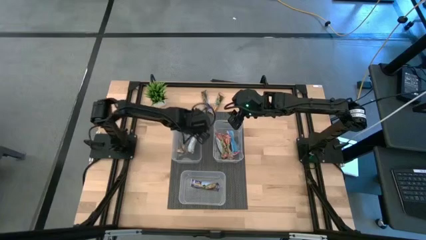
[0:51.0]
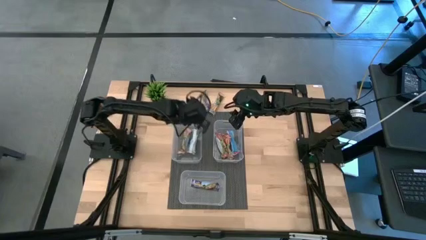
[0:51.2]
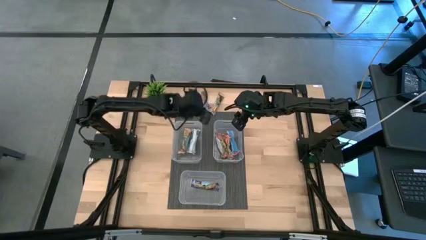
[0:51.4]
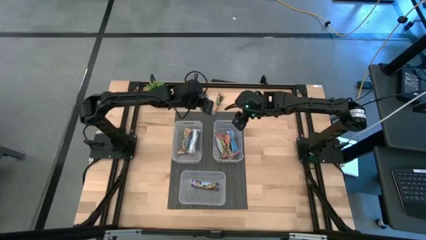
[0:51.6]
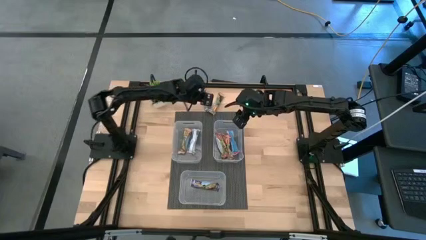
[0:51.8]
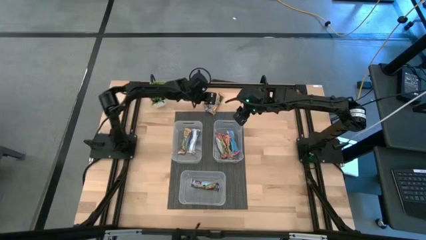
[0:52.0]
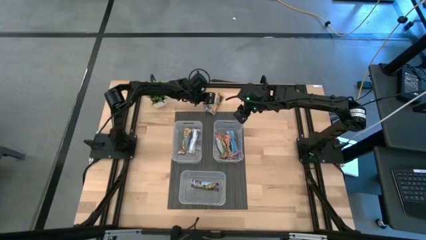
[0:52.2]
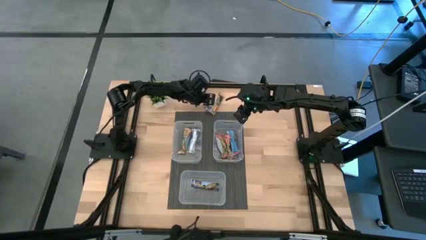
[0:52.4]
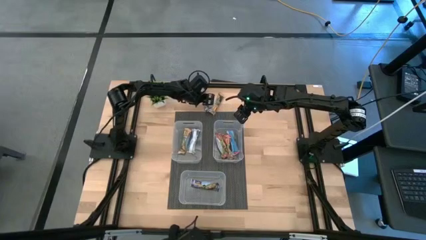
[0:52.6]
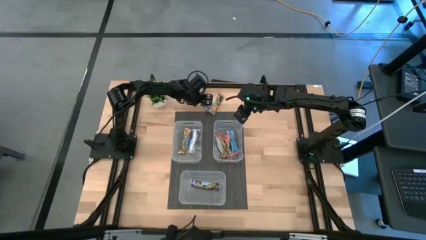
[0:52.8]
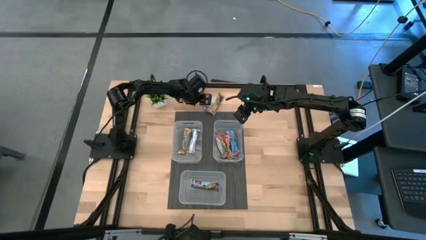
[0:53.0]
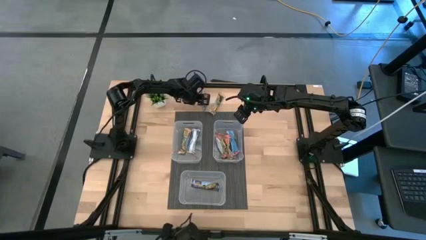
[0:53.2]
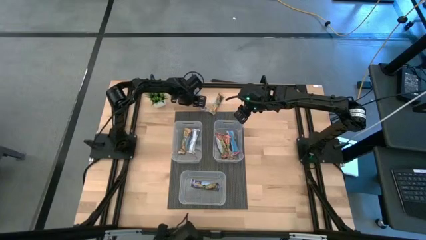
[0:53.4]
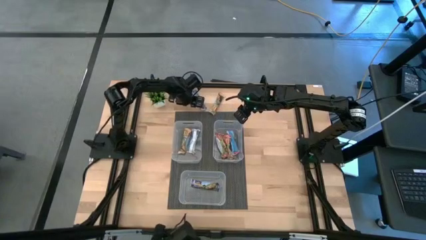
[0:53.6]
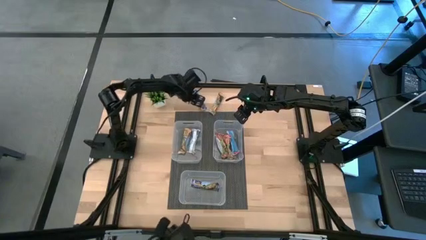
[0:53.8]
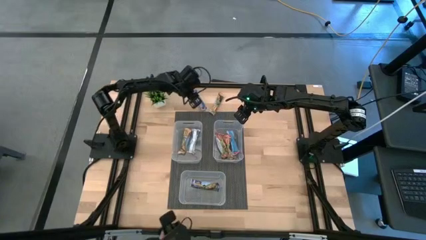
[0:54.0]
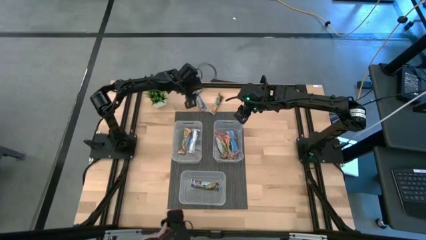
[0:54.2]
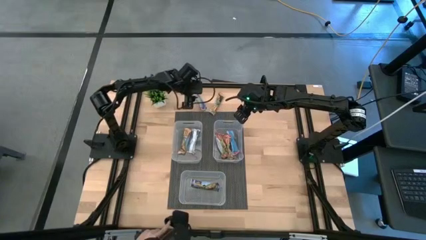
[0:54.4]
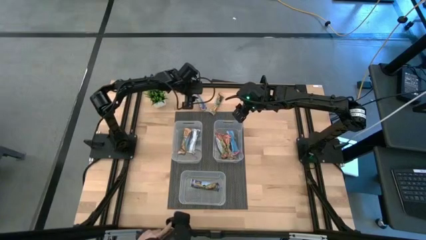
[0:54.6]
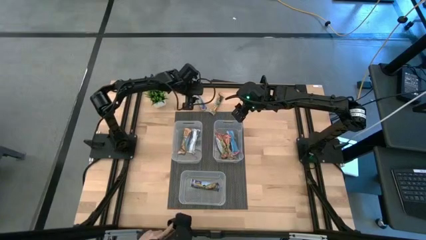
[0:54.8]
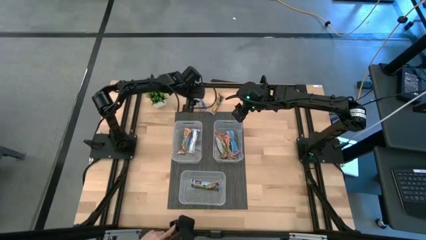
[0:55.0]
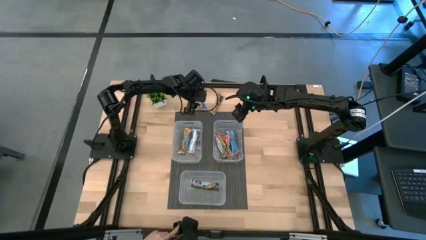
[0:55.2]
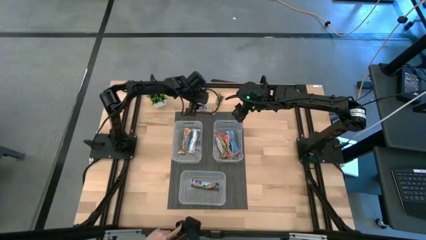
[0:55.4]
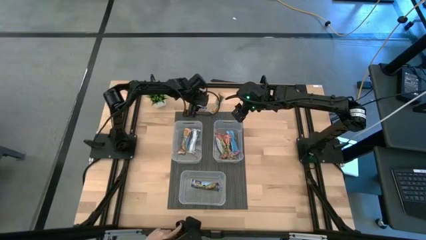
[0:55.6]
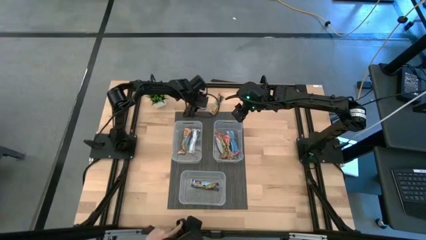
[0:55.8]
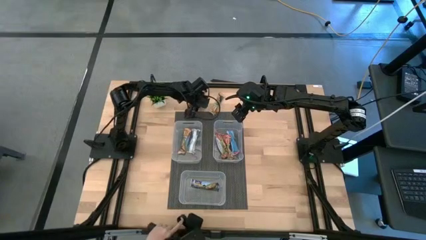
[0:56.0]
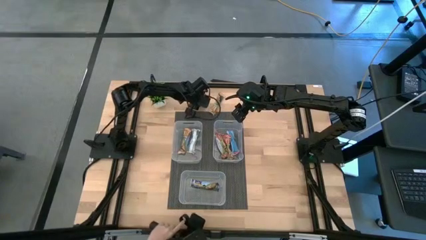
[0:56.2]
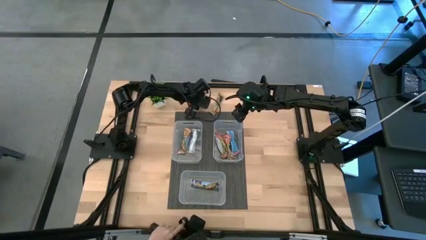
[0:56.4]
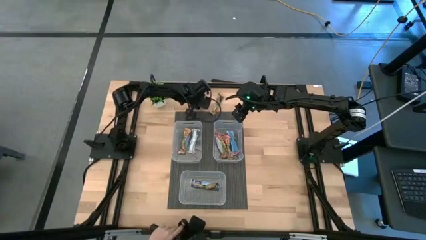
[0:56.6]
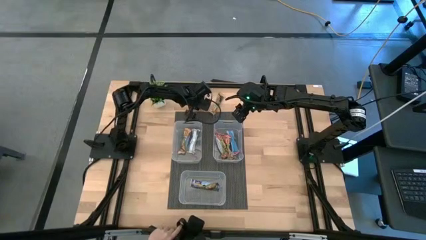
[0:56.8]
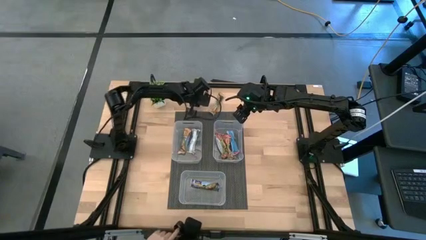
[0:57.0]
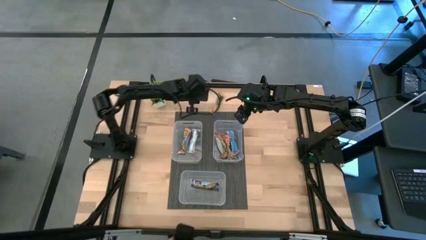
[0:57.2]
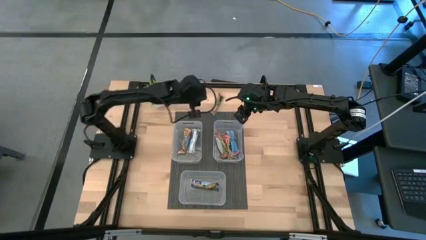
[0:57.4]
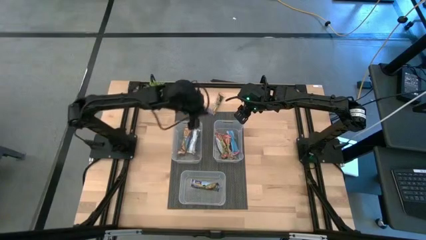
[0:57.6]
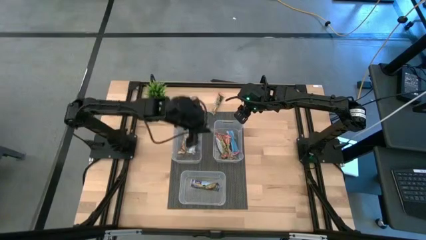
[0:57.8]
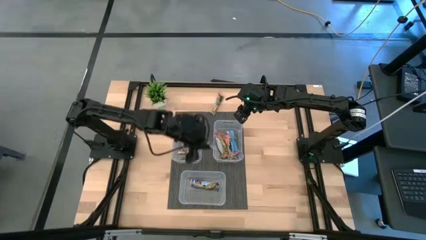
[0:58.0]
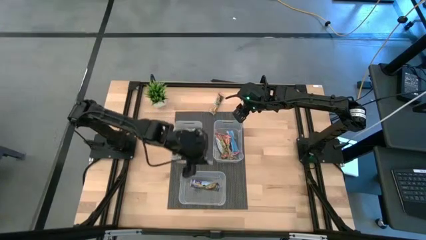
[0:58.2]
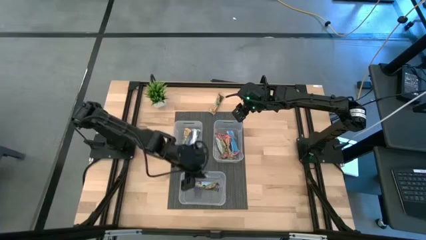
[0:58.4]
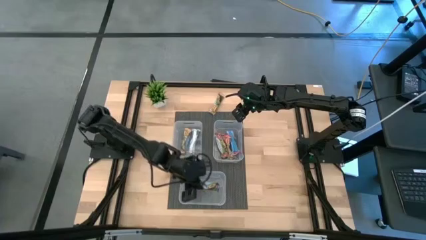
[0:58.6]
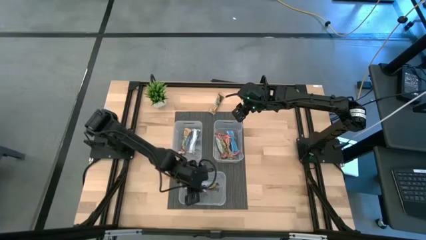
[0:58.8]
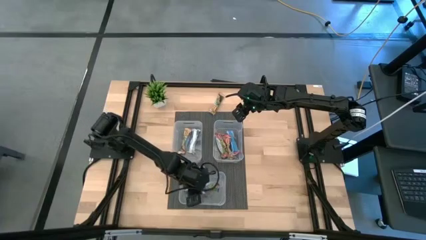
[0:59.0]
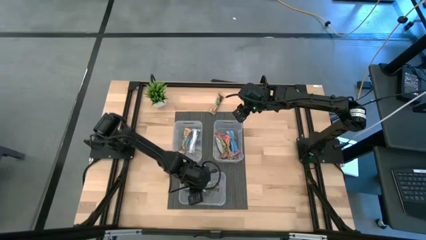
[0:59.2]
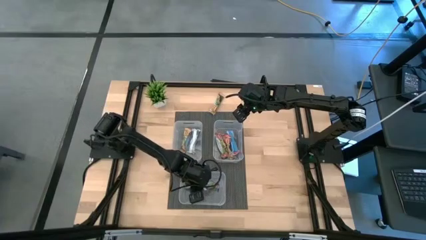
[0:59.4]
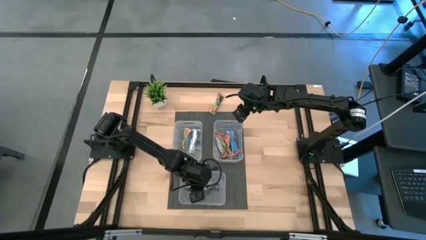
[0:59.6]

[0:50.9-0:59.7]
Task: Pick and place Granola Bars by type
Put the blue granola bar into the bottom transparent bin

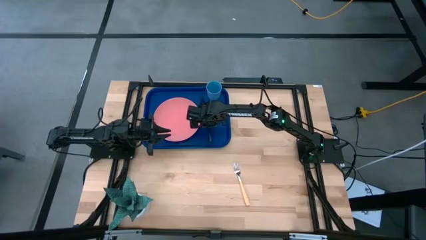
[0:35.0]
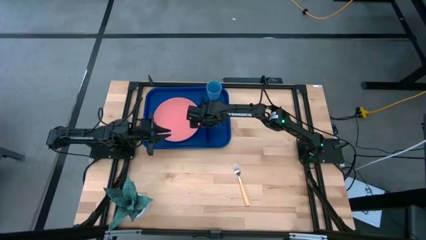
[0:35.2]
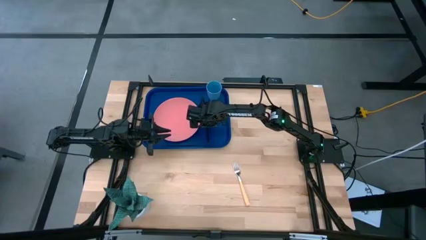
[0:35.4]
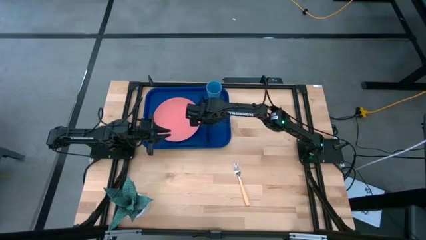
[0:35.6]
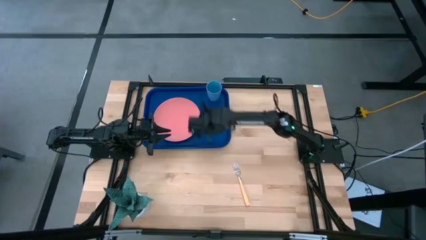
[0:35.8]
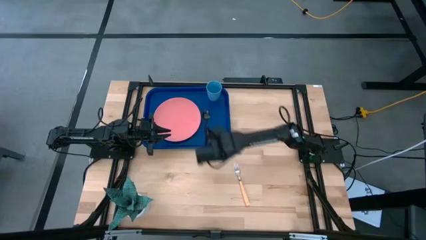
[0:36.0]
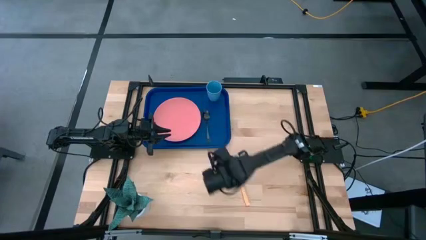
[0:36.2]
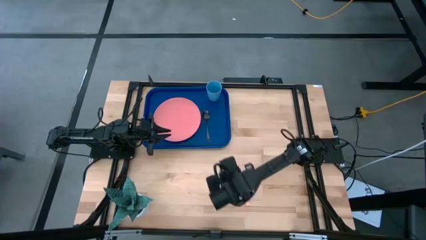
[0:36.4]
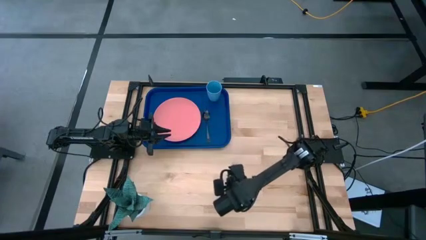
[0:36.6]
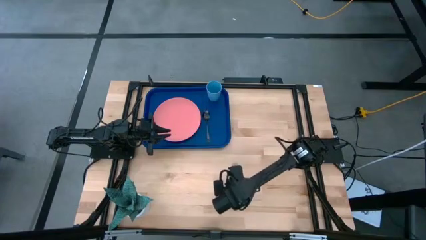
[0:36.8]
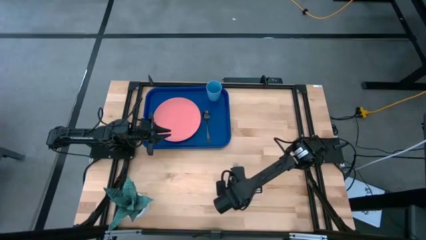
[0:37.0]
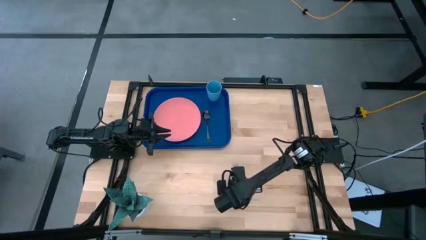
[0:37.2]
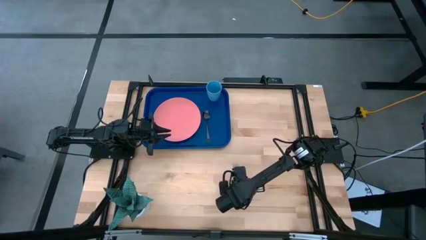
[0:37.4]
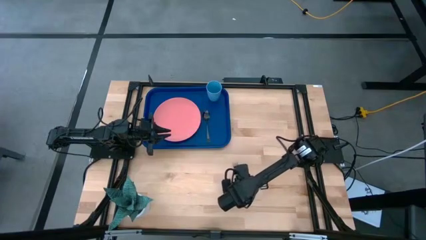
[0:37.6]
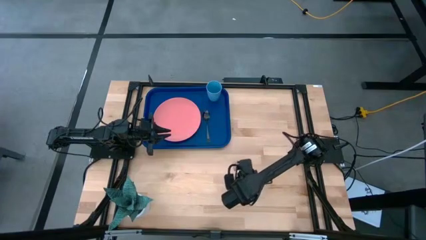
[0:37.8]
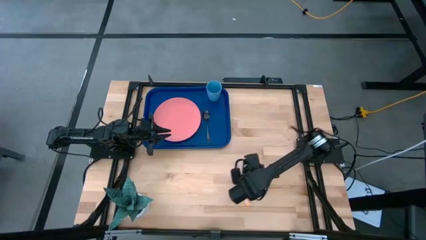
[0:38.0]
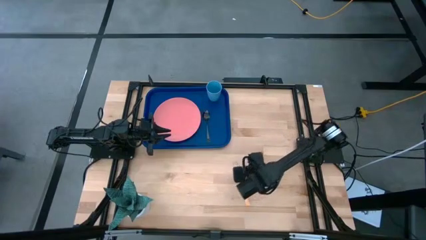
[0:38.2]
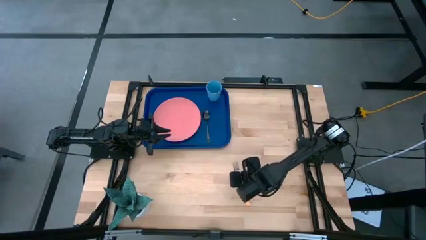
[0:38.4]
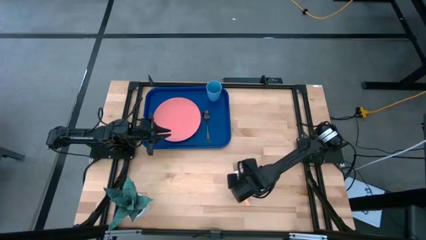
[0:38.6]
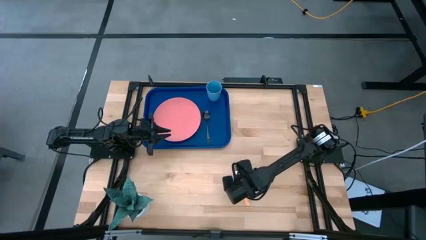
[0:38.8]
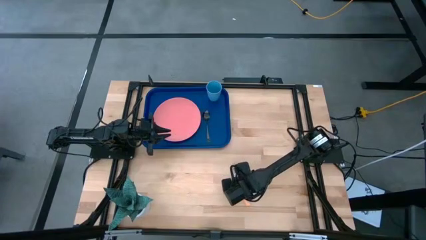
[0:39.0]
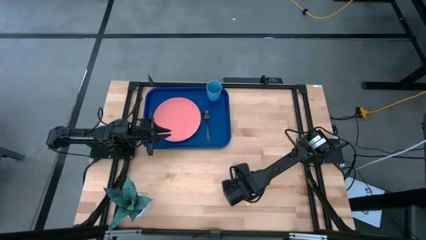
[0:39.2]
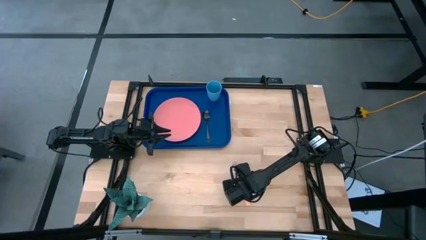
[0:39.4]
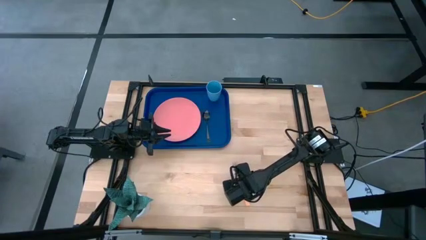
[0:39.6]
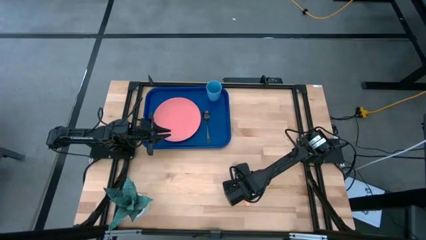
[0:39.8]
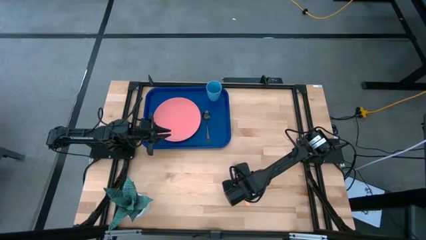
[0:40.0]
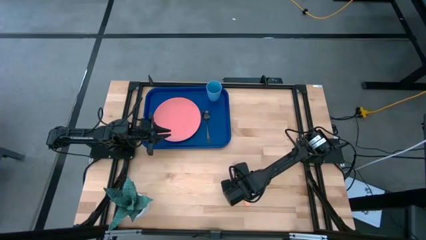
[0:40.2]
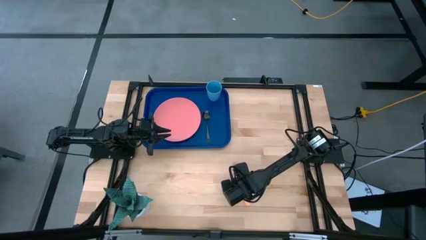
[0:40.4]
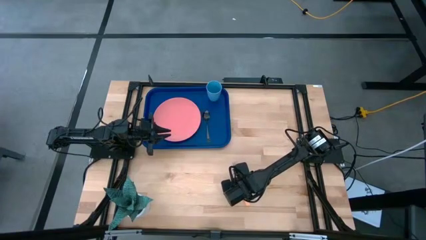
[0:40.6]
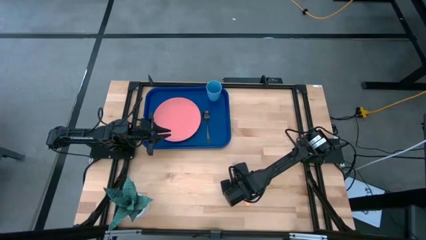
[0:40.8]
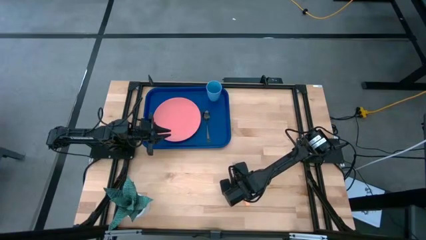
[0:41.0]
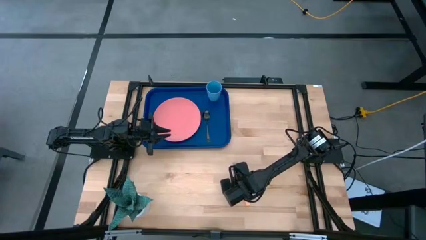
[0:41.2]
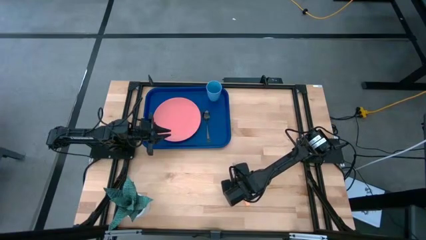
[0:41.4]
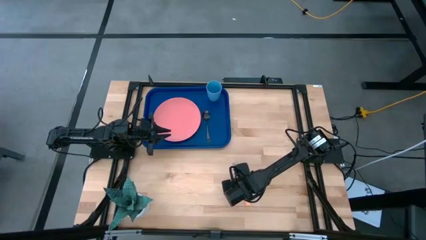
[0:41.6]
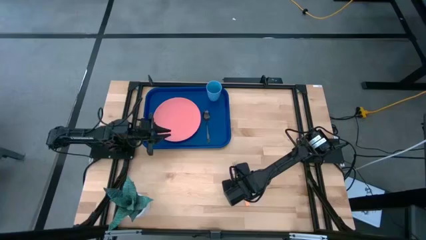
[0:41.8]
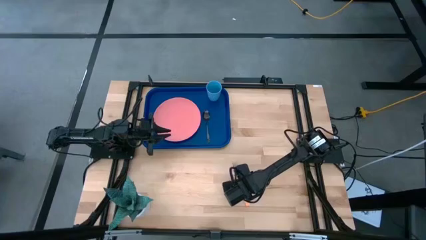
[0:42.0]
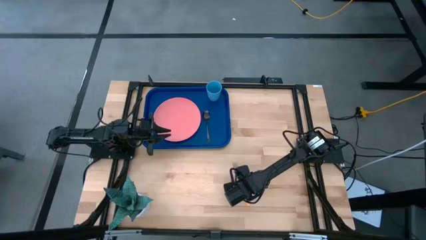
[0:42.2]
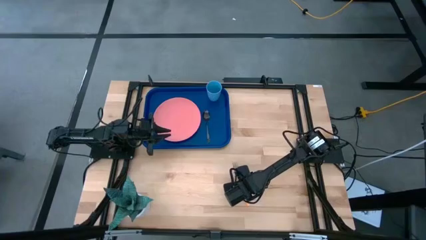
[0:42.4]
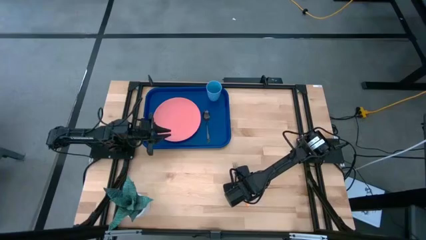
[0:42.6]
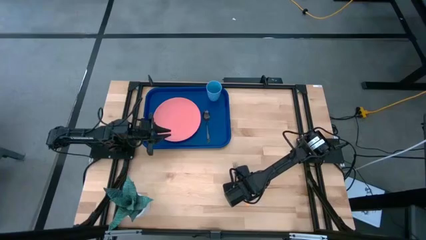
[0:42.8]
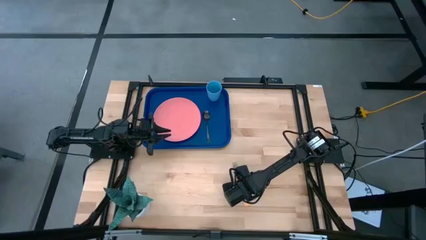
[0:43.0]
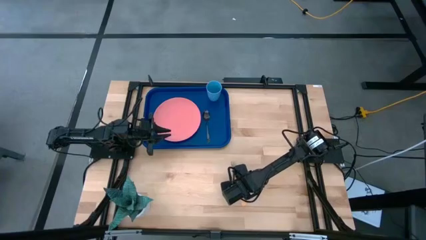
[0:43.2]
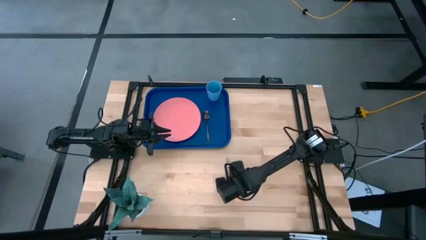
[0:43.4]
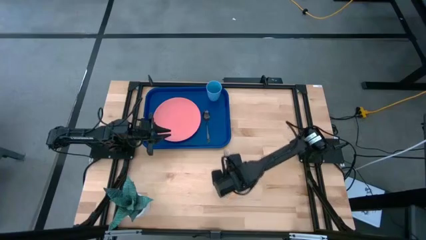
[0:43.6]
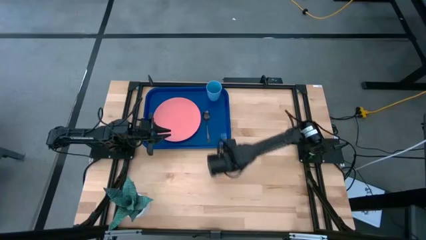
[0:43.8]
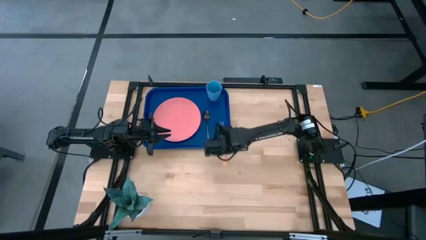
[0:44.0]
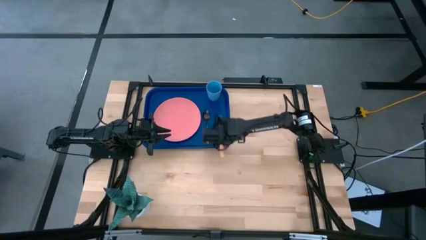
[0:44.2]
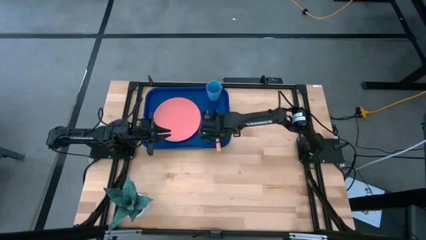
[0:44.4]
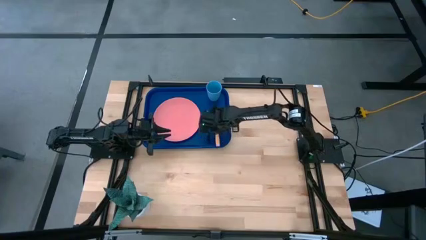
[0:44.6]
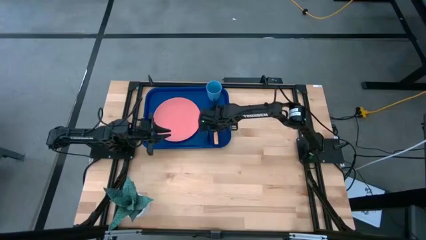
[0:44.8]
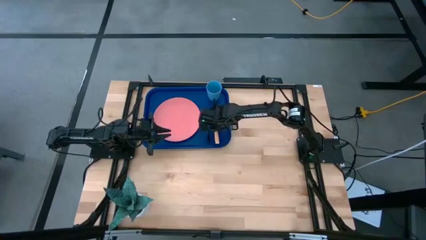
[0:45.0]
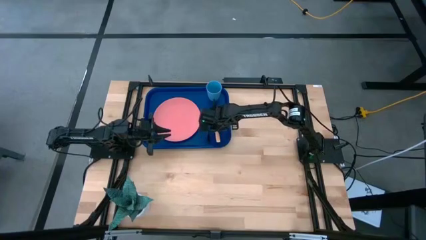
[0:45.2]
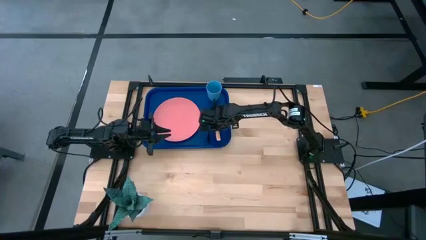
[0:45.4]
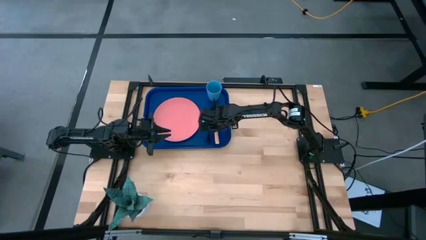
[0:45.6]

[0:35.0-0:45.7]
Task: Pick and place plate/cup/fork/spoon on tray
Put the fork right side of the spoon
